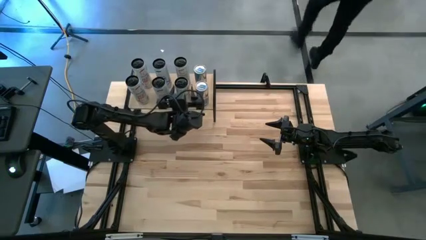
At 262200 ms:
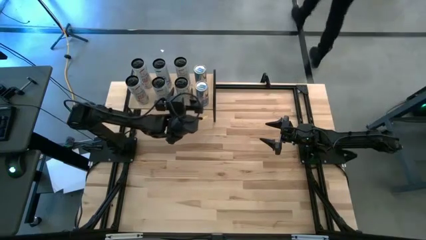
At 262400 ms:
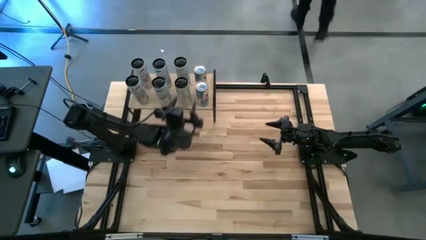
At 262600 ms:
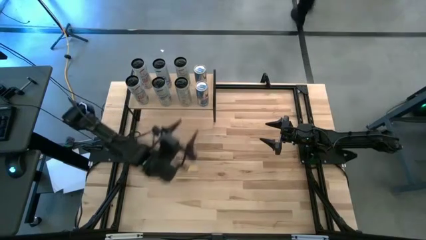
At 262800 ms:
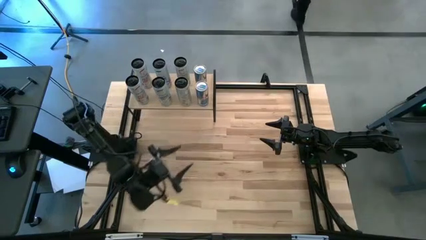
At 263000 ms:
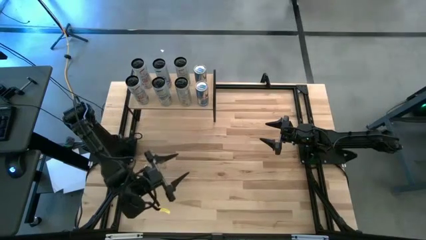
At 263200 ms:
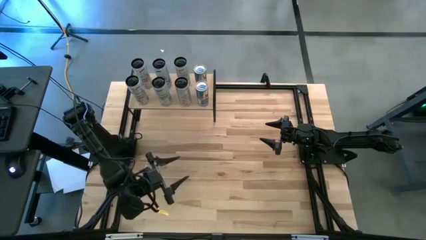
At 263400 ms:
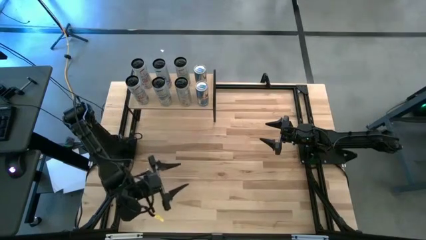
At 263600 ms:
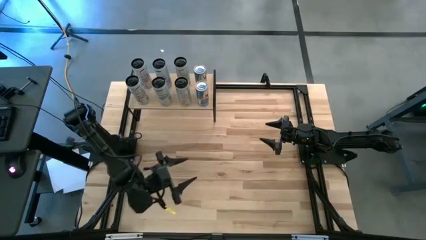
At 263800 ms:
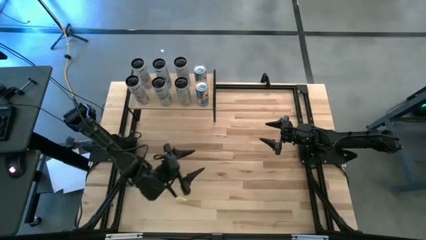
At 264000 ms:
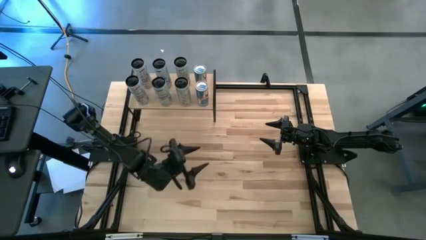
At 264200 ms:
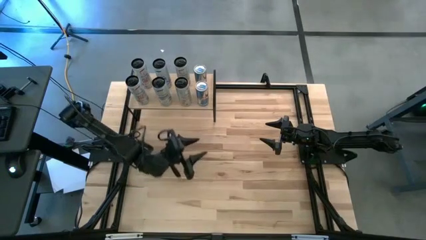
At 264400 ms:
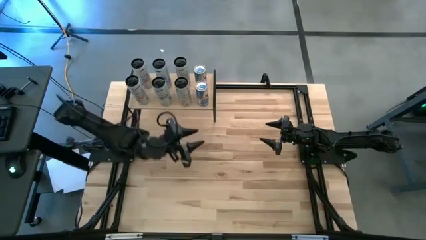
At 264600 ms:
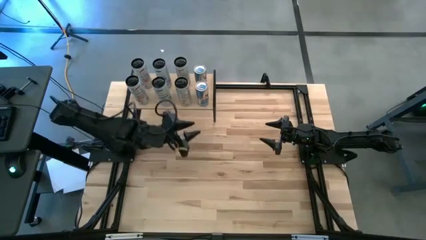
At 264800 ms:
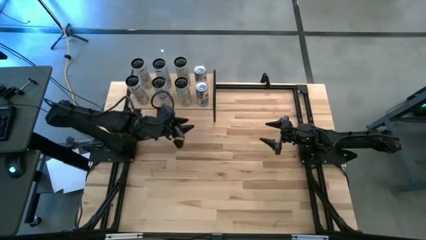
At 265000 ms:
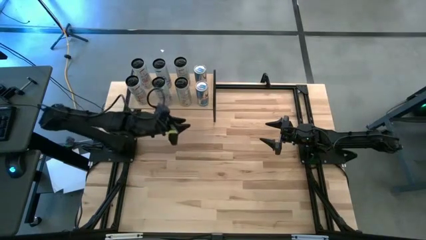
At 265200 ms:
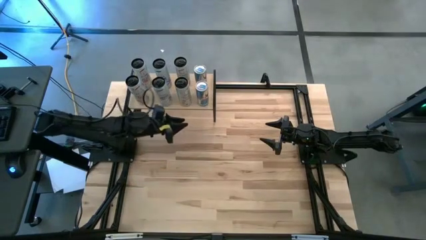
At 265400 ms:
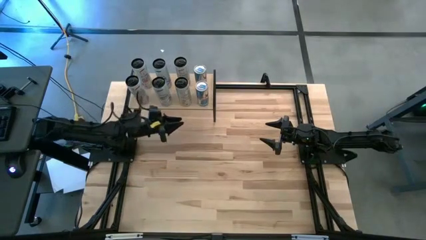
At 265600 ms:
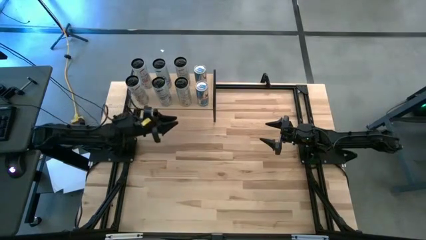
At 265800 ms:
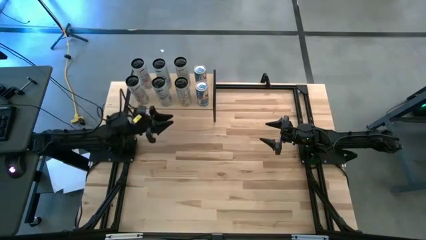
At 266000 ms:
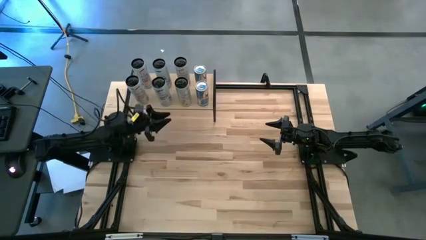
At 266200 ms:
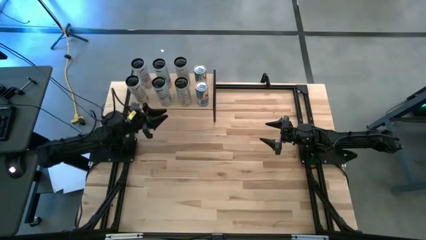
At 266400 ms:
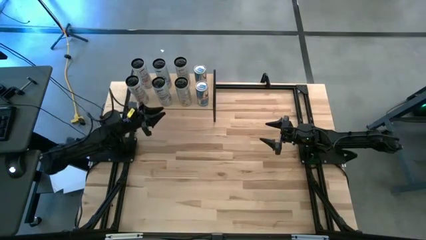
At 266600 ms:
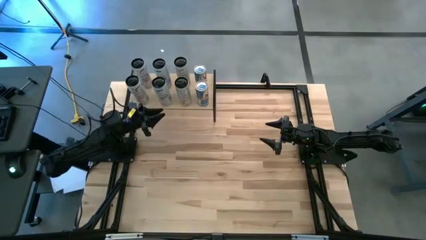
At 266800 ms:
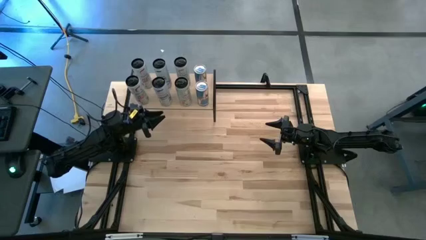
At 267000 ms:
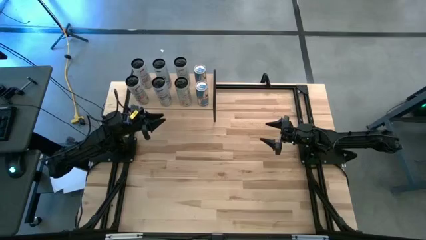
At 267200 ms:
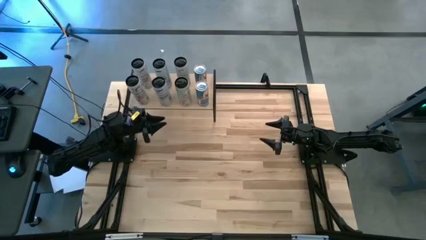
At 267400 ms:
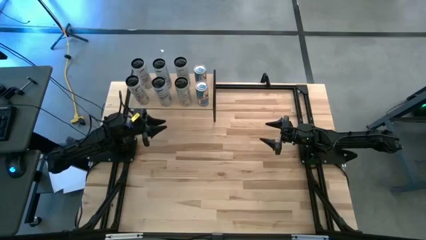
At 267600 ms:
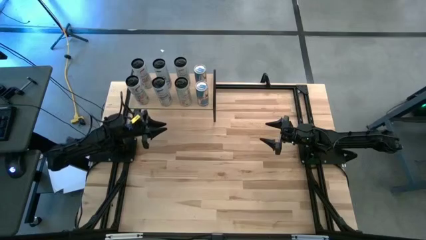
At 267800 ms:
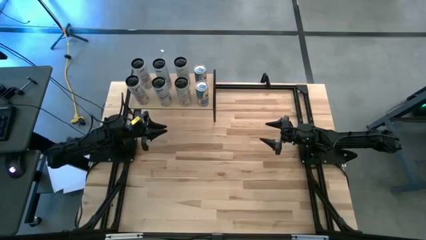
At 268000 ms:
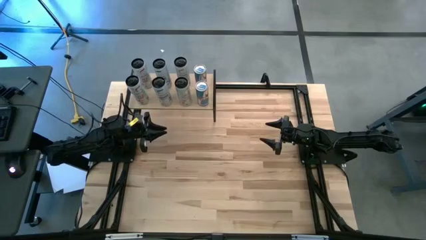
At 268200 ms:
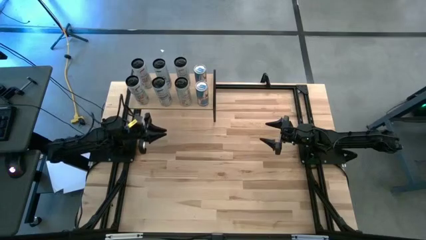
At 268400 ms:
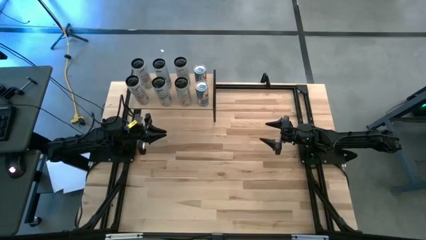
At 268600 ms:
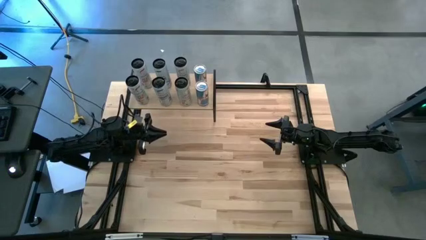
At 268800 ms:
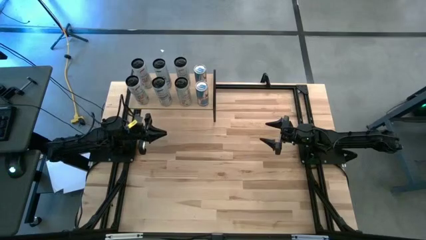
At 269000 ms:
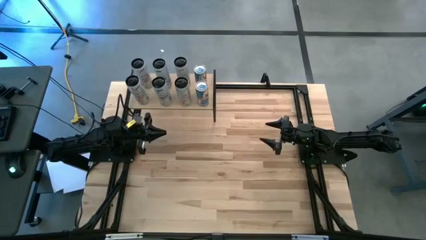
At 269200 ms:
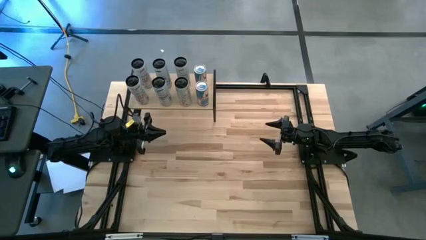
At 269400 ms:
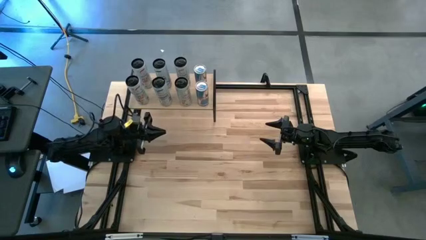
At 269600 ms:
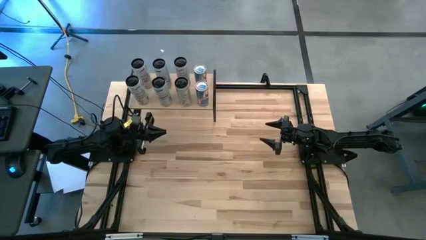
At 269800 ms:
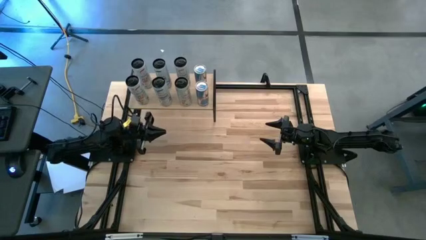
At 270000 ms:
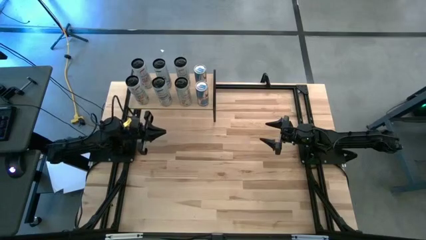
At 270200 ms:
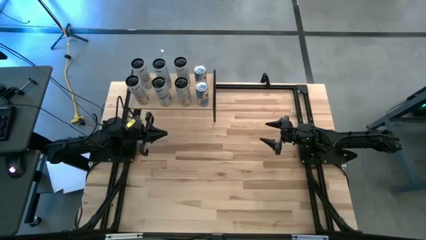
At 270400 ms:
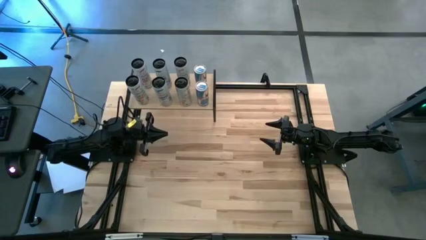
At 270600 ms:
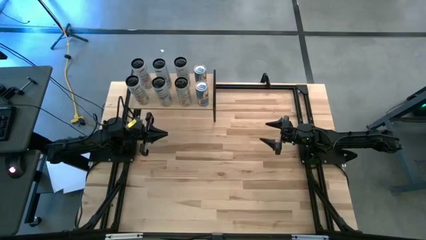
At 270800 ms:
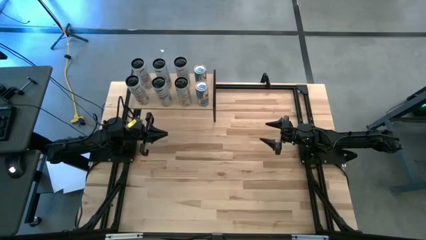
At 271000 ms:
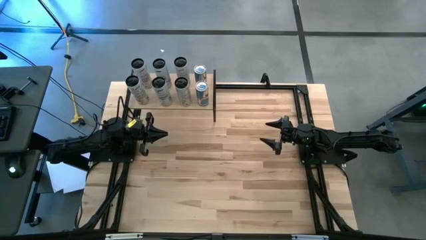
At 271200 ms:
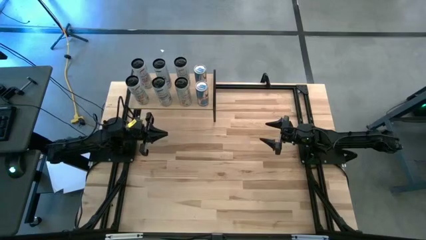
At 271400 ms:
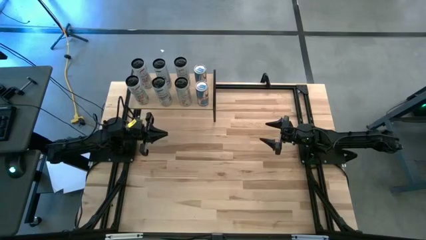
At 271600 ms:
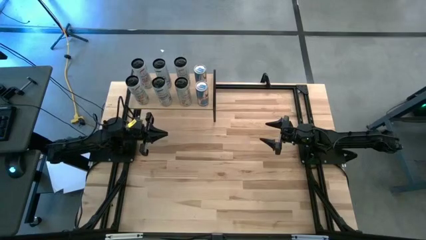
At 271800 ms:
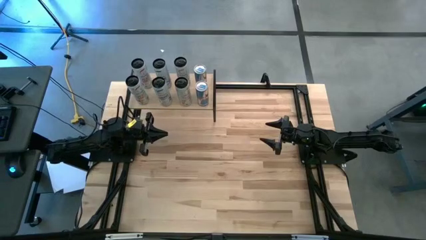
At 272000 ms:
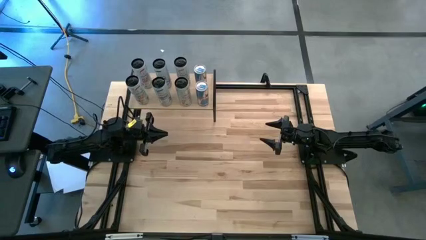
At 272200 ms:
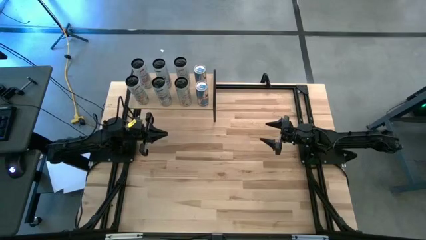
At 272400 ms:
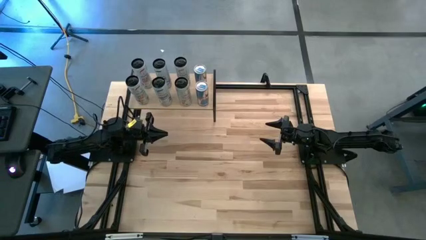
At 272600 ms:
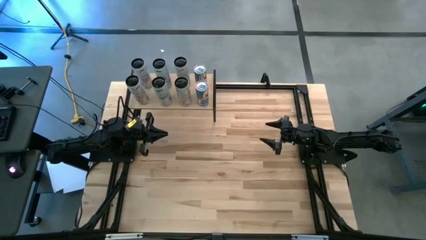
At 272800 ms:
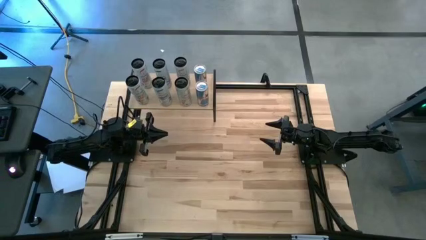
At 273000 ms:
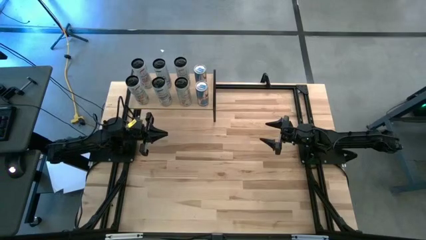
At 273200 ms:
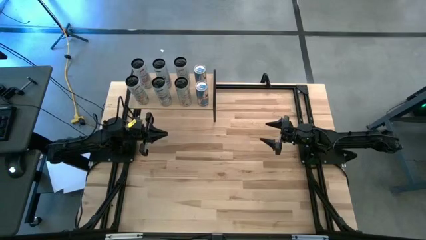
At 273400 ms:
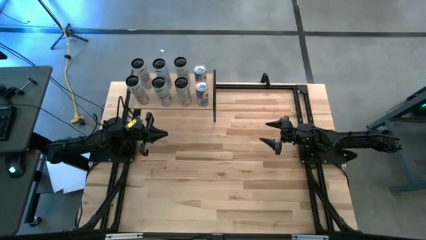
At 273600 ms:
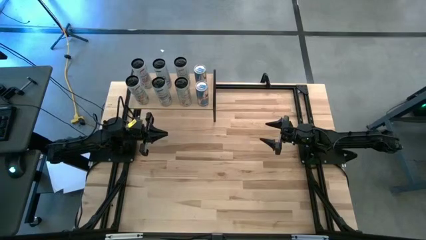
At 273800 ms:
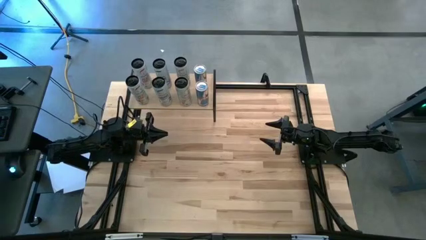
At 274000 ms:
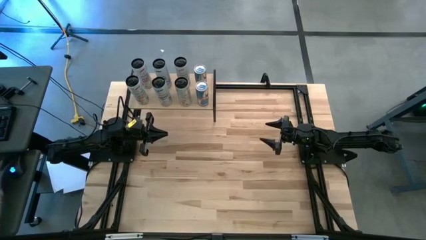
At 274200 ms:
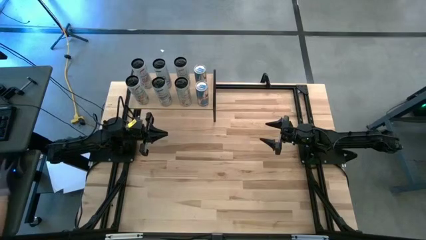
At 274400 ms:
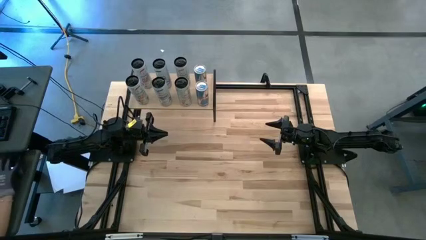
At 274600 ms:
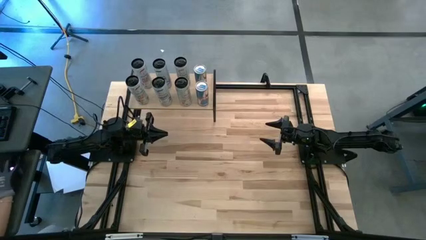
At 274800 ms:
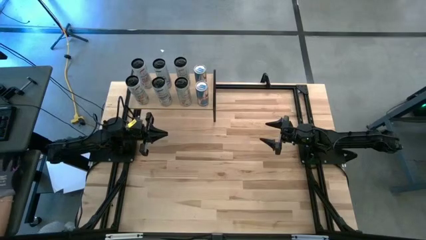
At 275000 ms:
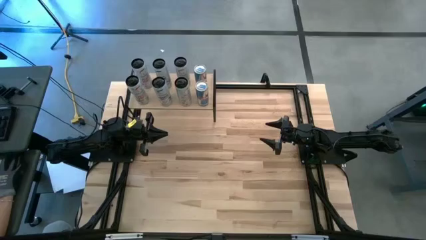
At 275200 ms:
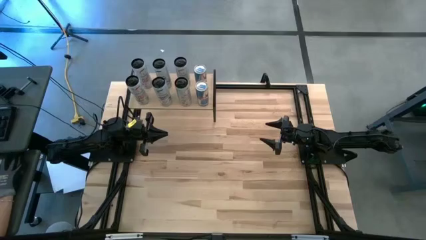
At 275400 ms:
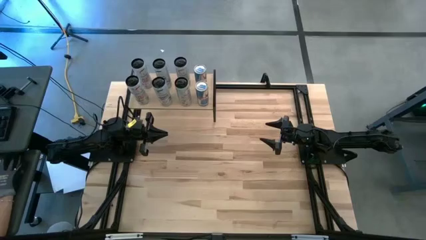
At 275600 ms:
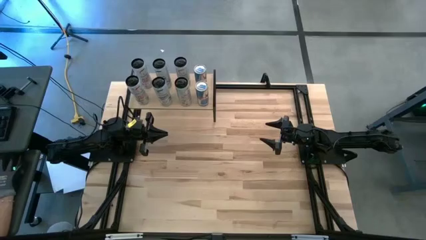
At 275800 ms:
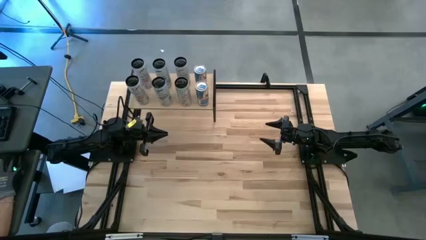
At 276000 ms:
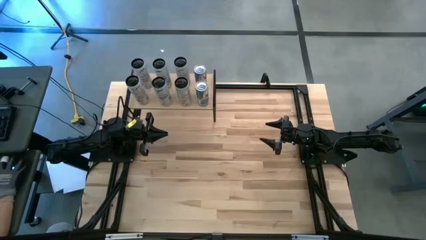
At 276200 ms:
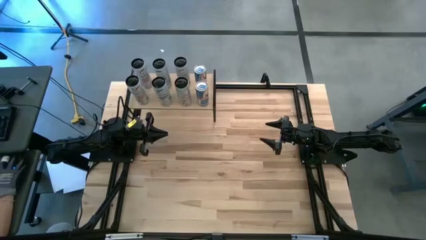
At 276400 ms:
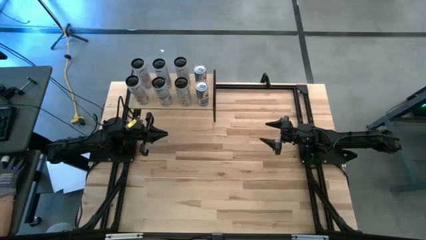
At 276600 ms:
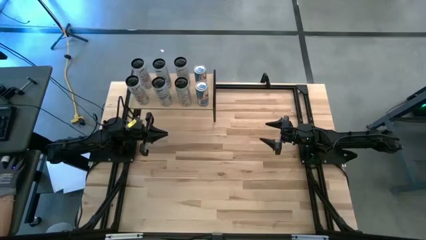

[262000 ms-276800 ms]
Task: Place canned beverage on shelf
Return to Home Position
